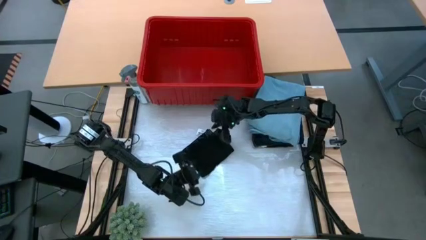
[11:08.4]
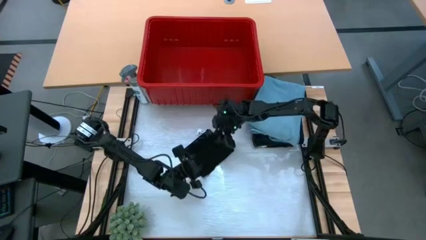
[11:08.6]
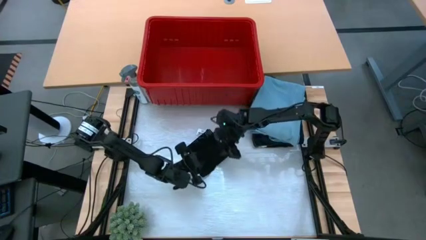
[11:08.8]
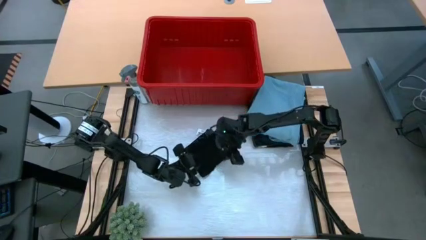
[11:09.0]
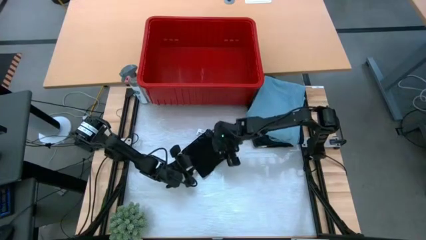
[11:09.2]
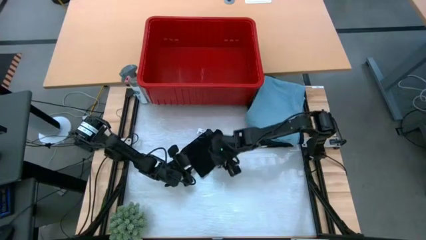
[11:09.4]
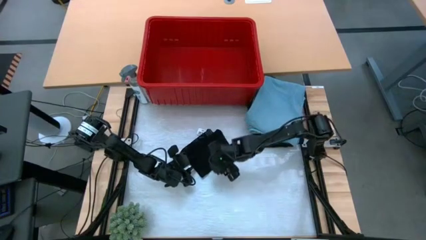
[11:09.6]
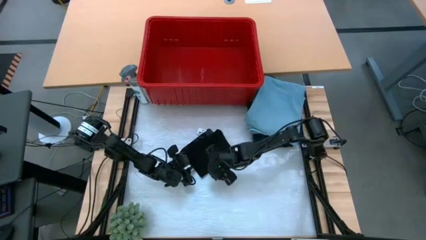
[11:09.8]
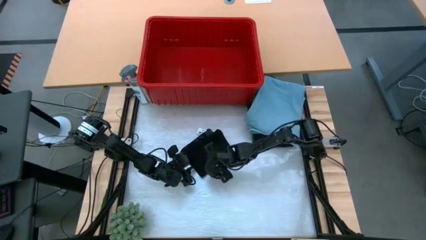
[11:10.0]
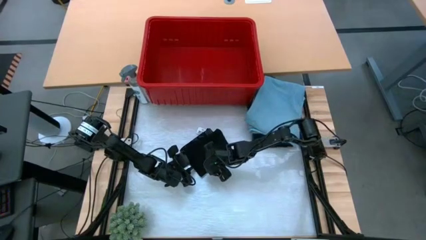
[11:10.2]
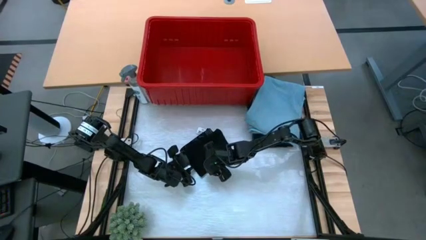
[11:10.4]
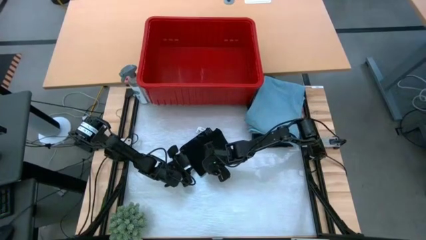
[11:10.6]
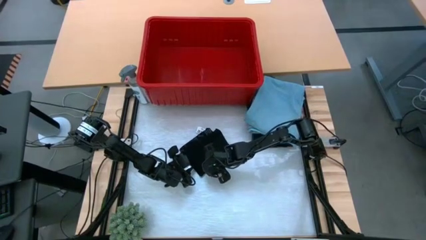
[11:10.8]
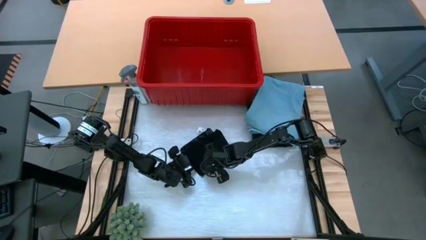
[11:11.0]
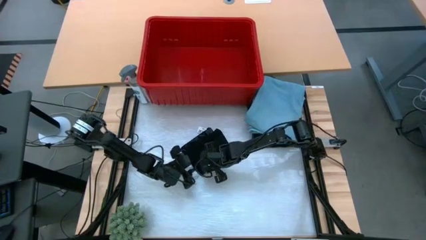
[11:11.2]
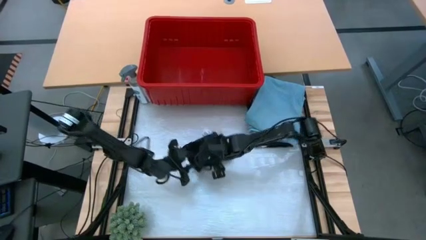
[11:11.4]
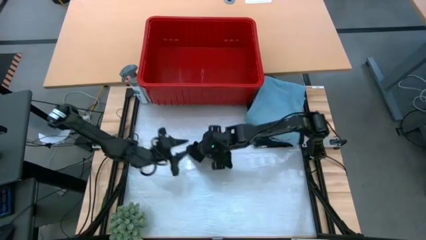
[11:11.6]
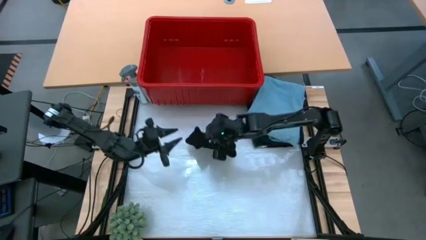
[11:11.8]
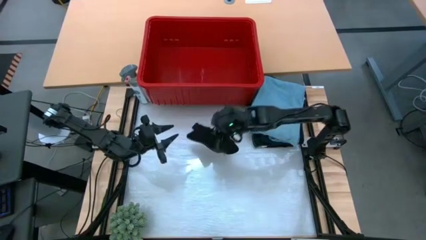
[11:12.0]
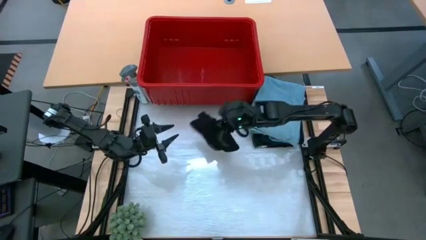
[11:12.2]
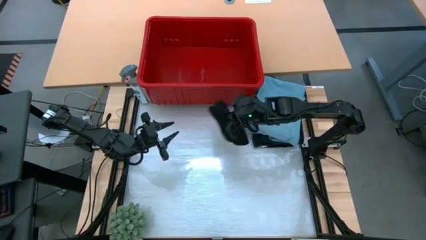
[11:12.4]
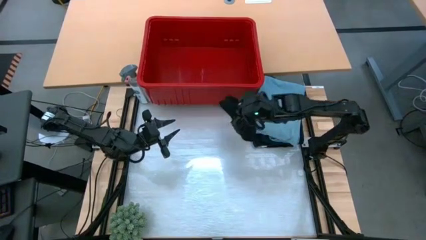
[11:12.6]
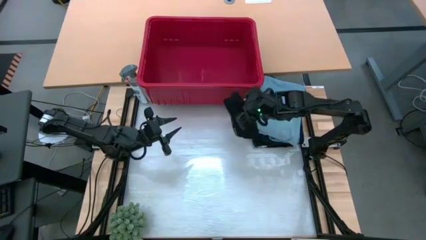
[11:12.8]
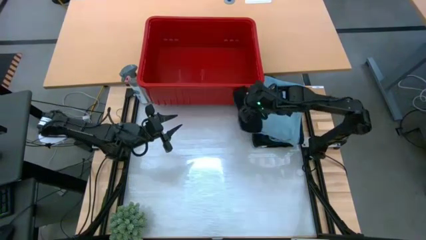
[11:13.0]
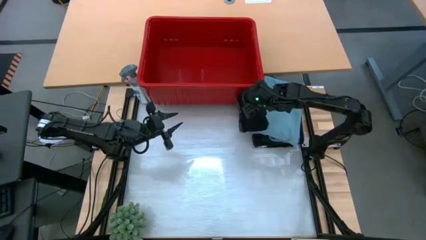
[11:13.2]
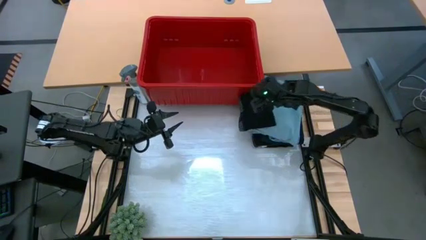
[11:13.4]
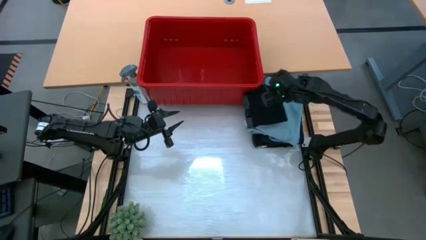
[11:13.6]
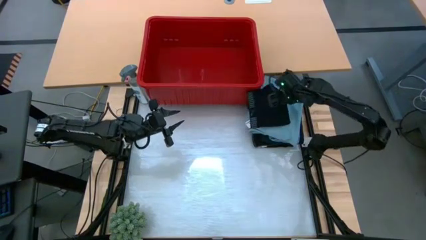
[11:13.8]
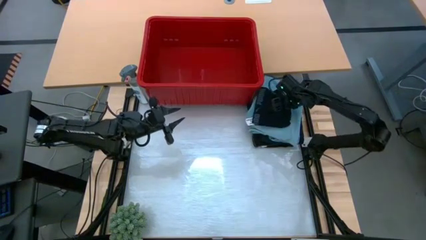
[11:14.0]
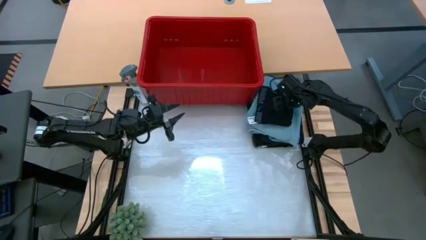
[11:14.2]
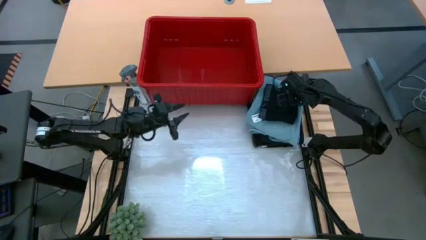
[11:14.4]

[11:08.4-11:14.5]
Task: Fold Laundry from Bin
Stack the folded black boxer short on top of the folded light blue pants

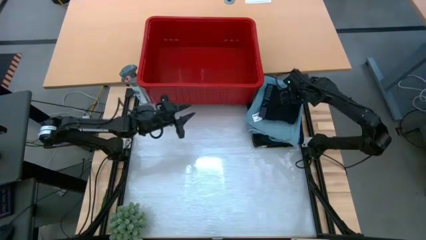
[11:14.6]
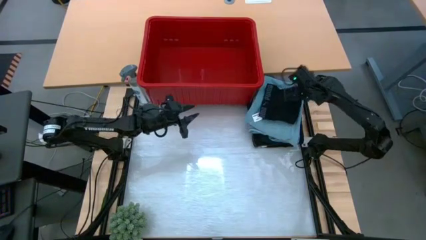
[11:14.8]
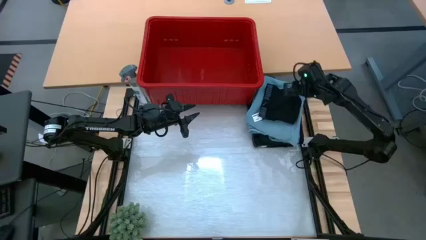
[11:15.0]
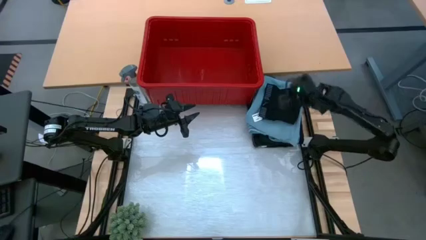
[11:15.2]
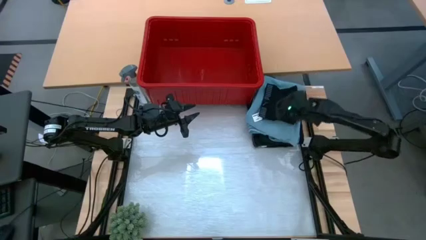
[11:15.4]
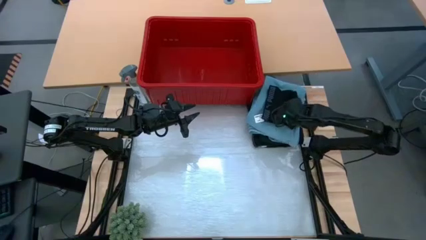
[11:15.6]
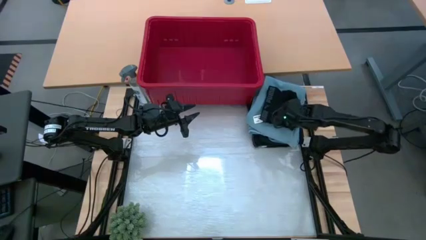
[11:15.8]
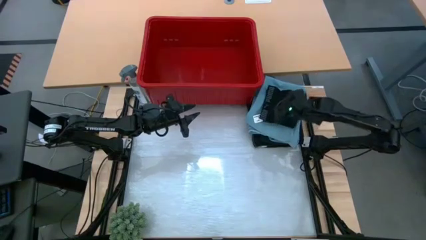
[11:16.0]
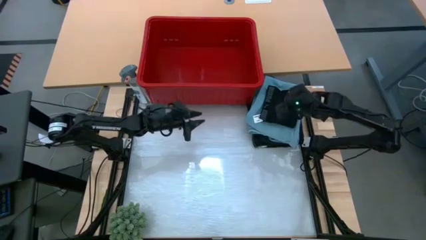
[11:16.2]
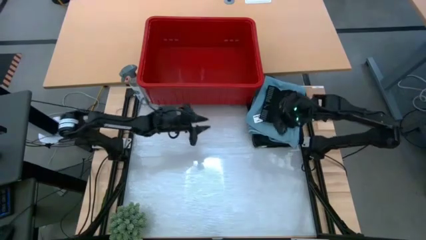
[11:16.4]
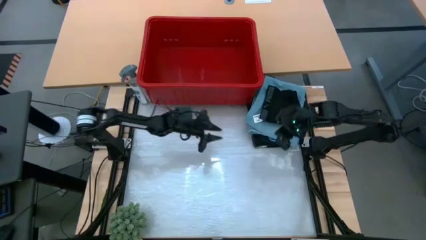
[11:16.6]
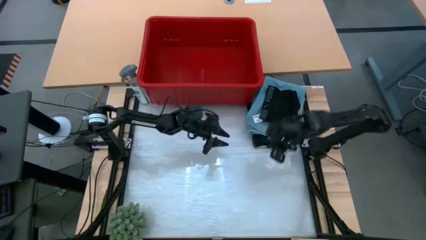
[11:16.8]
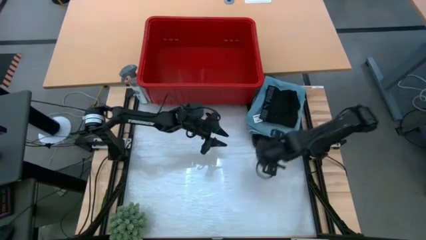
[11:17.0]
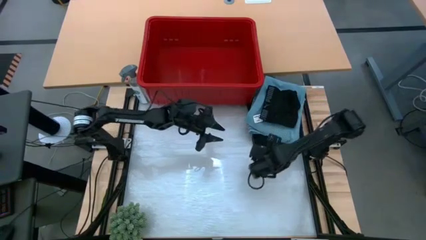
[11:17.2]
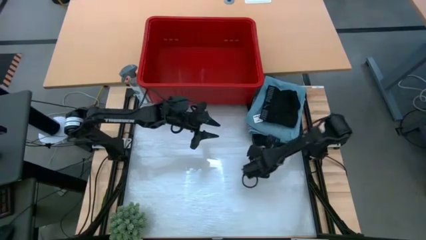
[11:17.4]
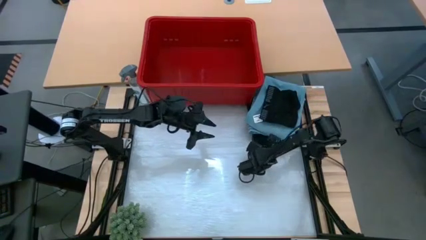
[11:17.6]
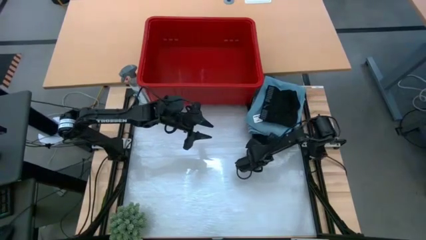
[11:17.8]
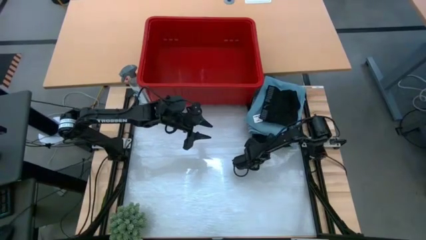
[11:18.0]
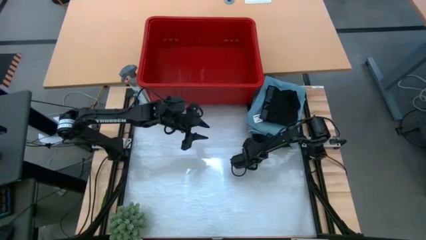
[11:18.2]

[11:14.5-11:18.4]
Put all the folded clothes into the red bin
